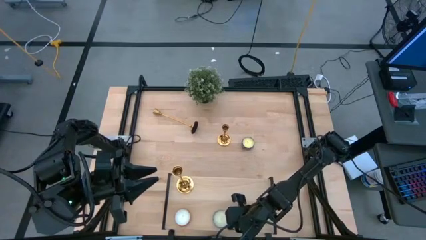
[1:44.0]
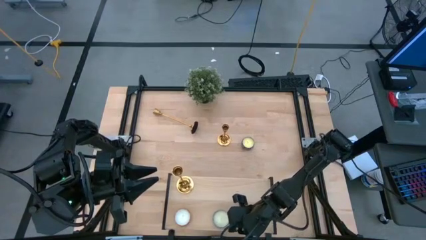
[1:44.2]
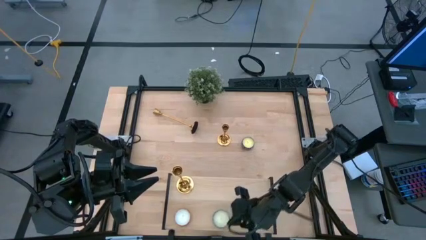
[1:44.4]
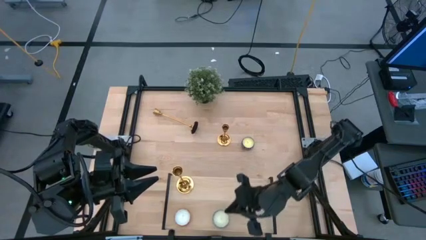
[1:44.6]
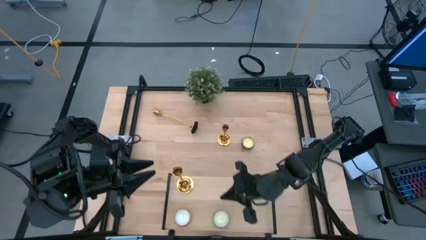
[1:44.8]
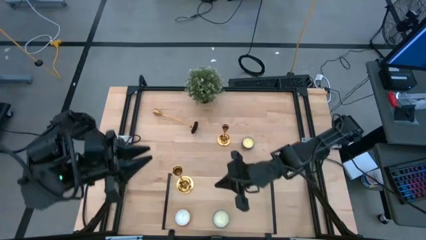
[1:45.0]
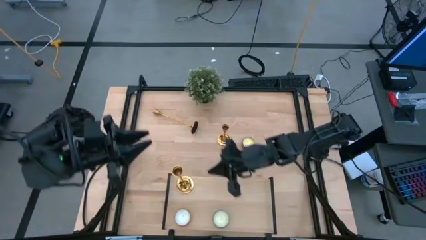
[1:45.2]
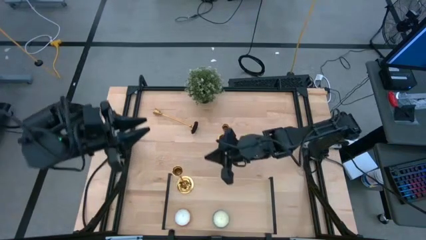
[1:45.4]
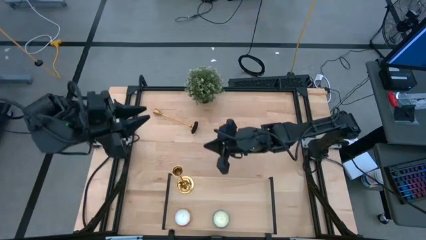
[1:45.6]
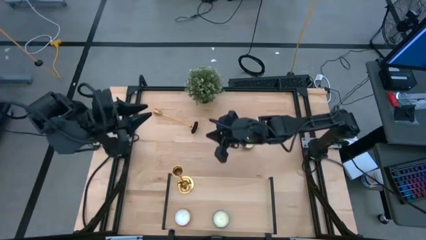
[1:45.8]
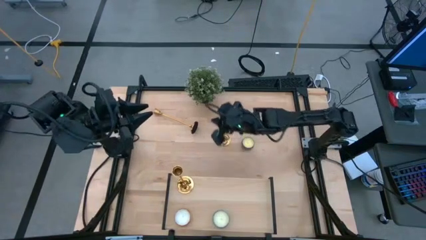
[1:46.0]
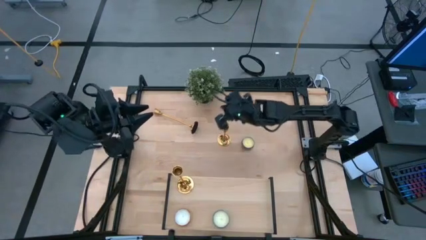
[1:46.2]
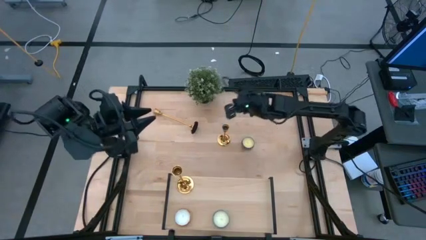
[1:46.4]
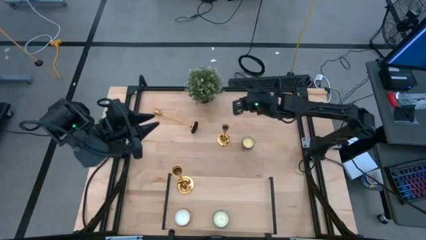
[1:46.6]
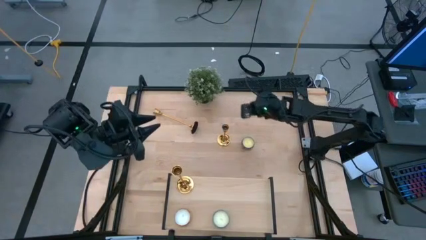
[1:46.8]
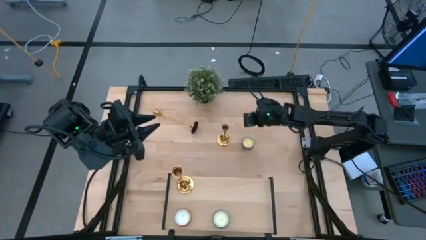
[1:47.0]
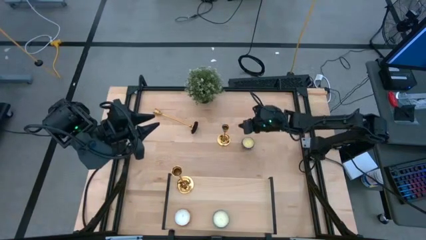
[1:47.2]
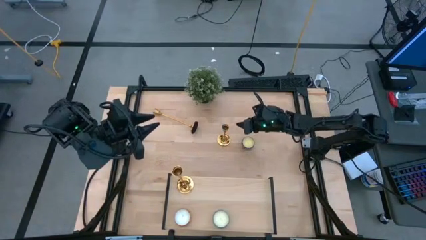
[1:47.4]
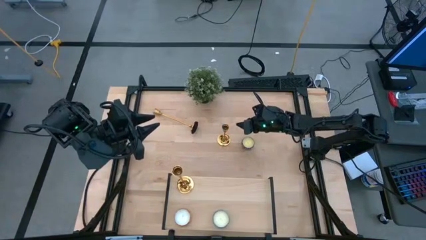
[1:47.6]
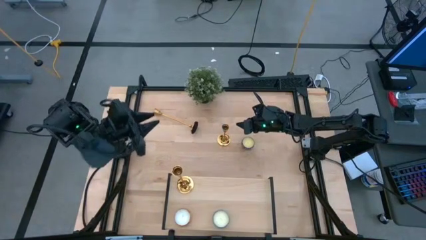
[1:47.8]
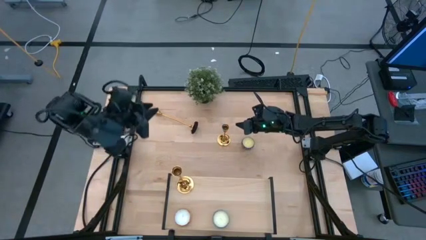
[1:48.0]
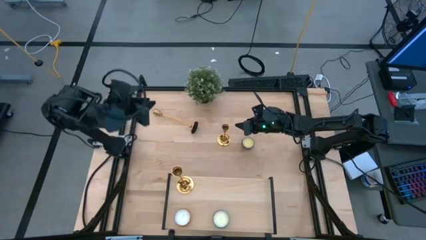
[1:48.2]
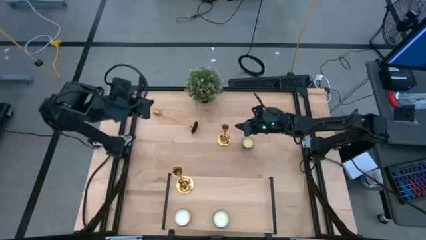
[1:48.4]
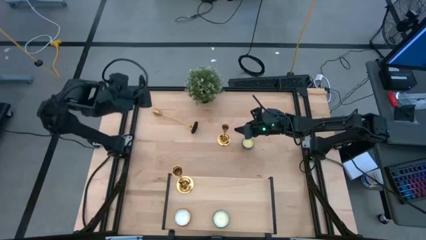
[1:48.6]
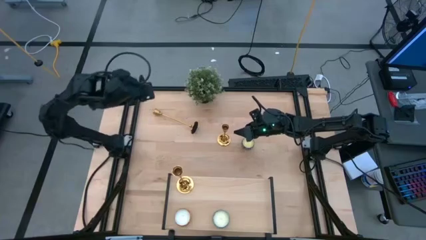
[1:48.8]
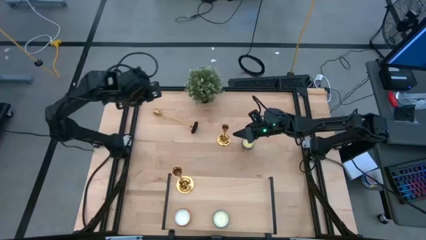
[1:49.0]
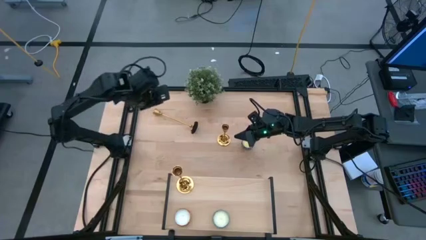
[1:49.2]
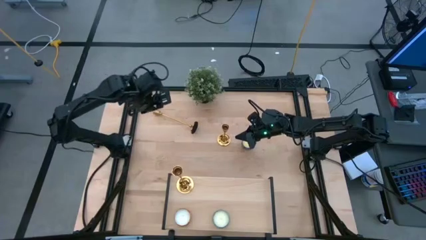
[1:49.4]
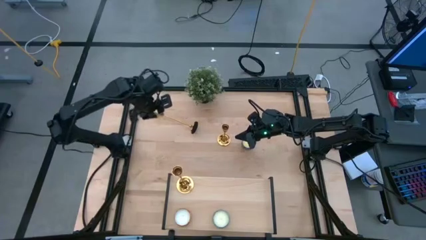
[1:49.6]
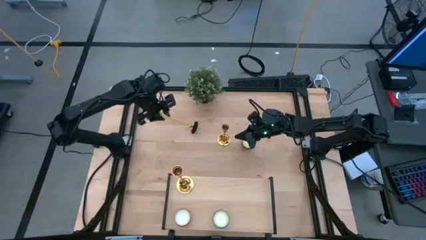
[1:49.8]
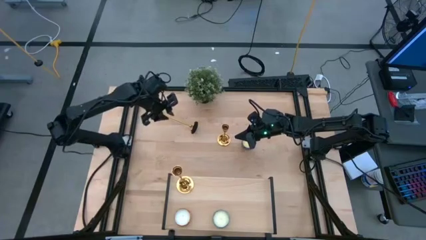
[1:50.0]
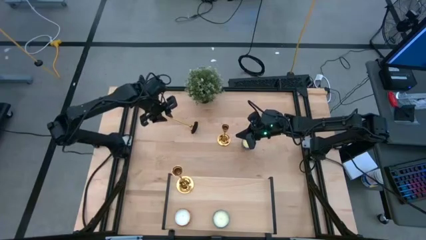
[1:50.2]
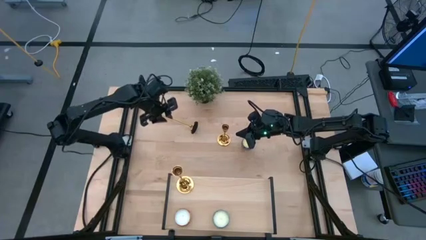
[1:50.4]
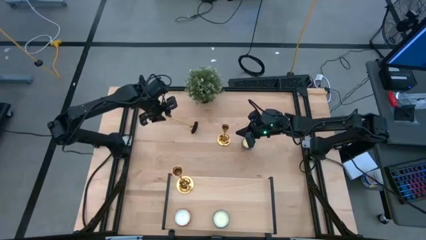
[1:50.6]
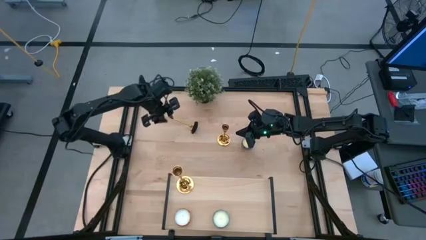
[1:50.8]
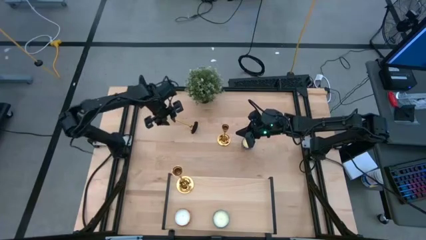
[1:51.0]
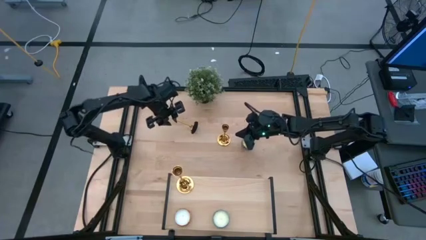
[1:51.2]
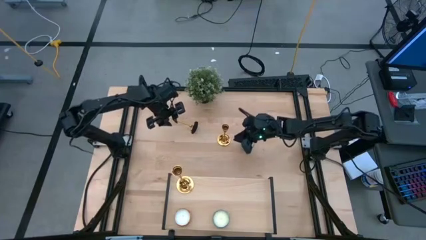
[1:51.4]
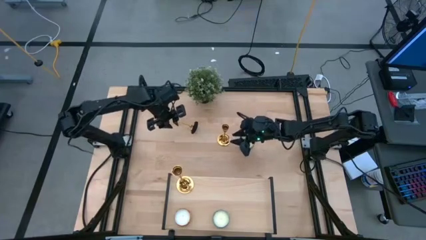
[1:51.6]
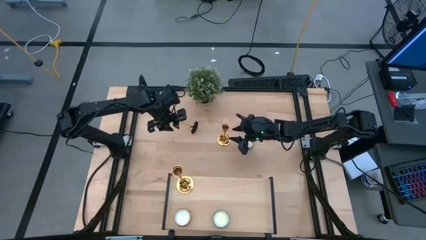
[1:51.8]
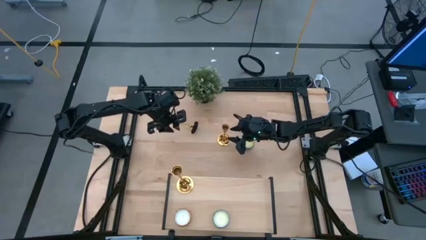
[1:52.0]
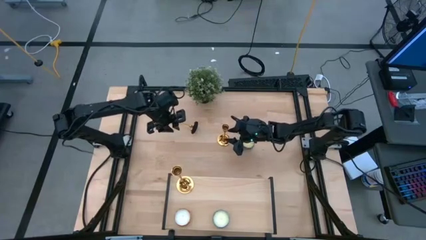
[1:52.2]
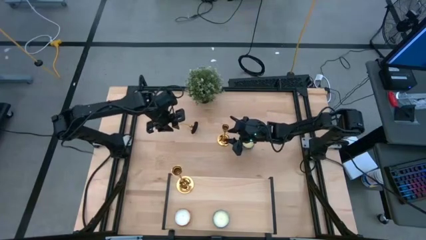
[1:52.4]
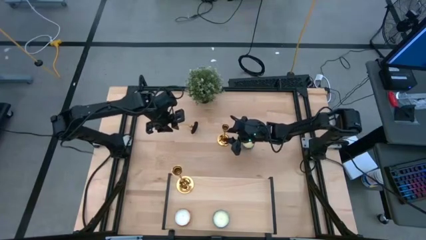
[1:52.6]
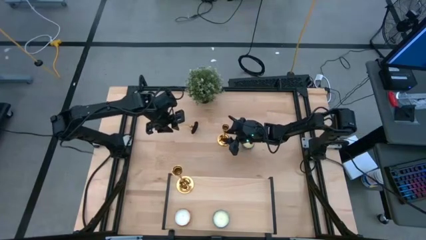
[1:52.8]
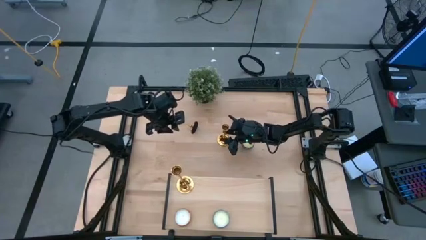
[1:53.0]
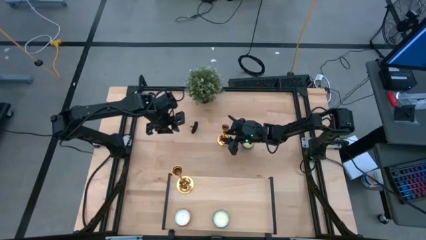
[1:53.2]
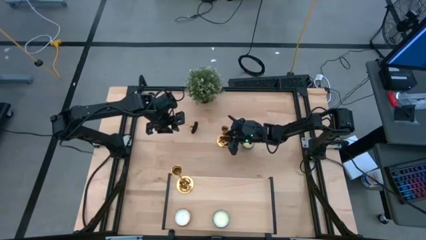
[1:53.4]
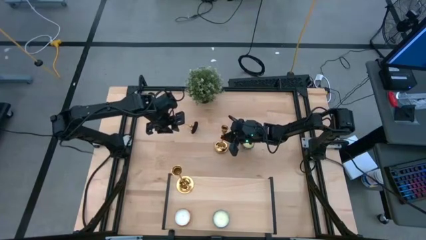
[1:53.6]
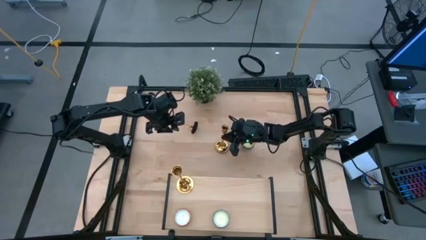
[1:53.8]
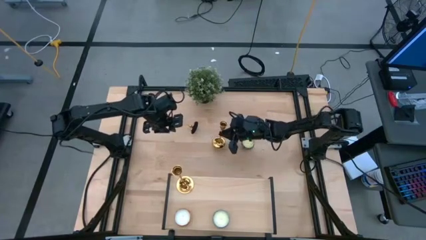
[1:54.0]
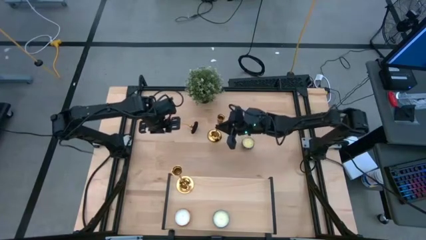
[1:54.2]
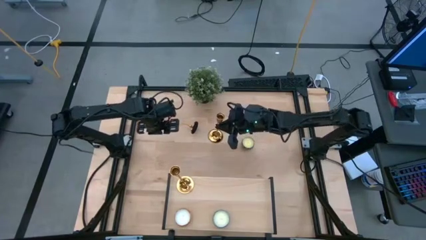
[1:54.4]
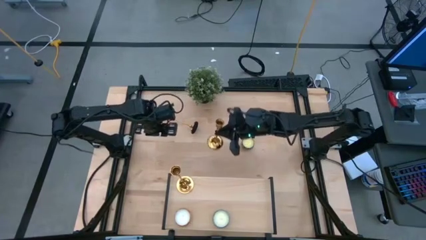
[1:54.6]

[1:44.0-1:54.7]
Task: Pick & Place candle stick holders
Put the right gold candle stand on the shelf

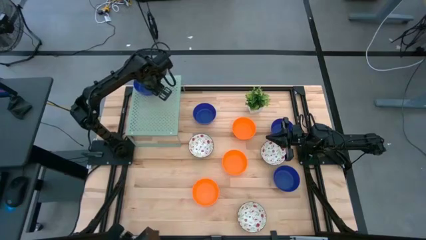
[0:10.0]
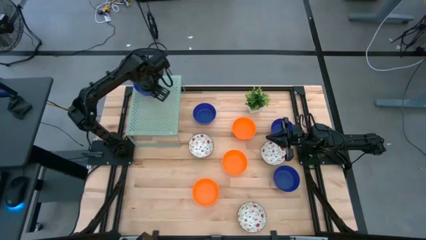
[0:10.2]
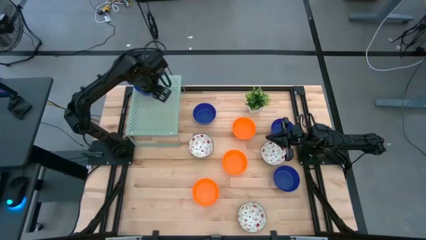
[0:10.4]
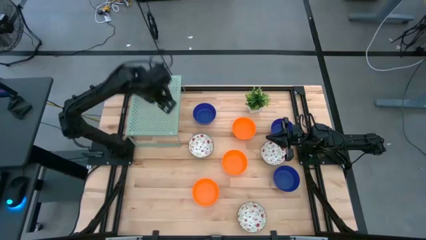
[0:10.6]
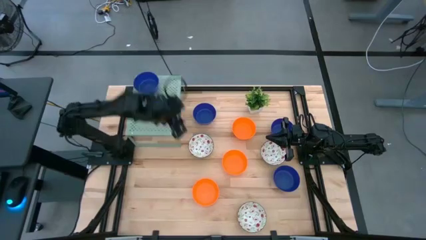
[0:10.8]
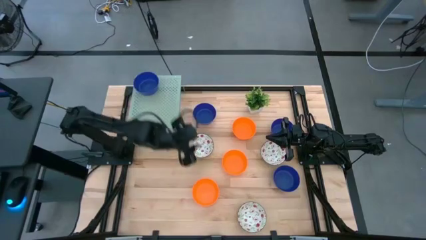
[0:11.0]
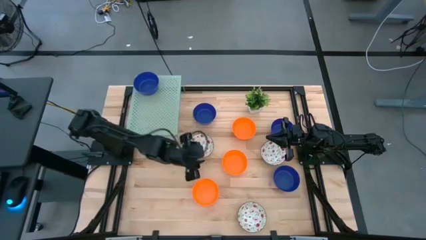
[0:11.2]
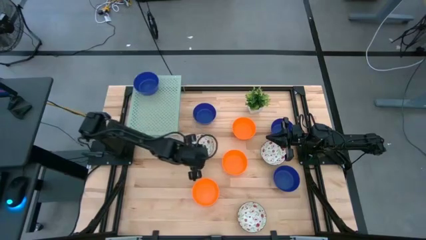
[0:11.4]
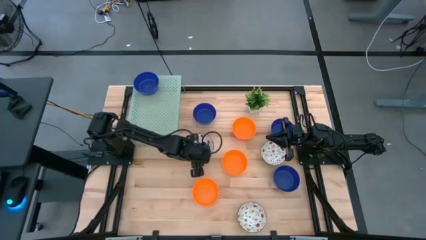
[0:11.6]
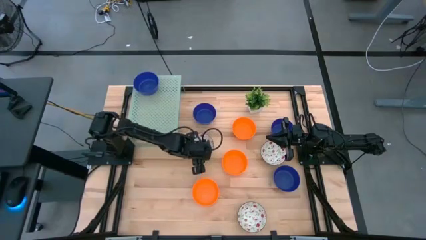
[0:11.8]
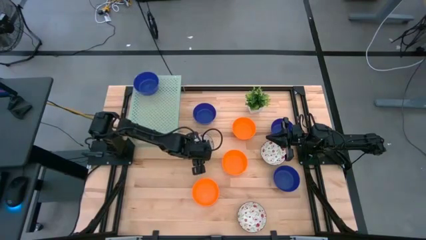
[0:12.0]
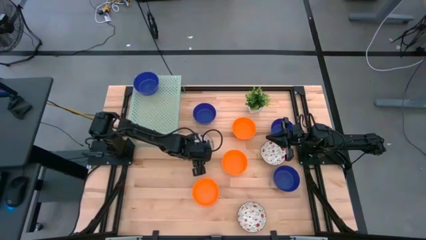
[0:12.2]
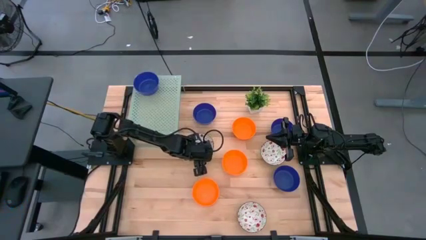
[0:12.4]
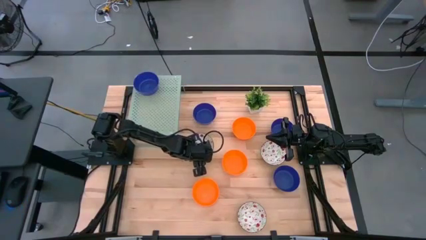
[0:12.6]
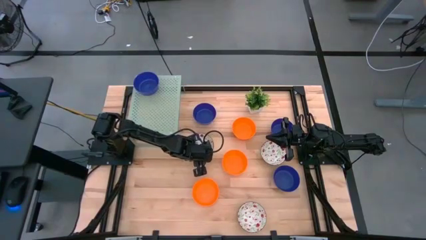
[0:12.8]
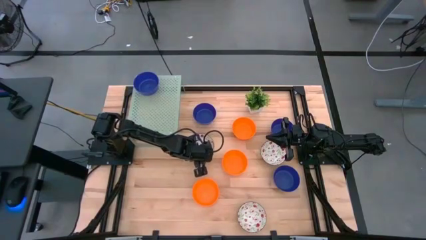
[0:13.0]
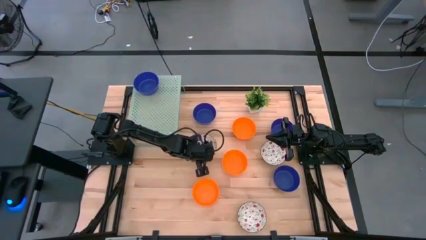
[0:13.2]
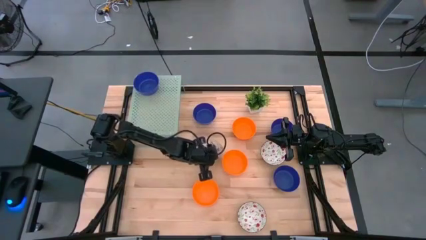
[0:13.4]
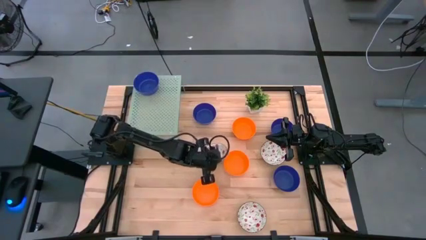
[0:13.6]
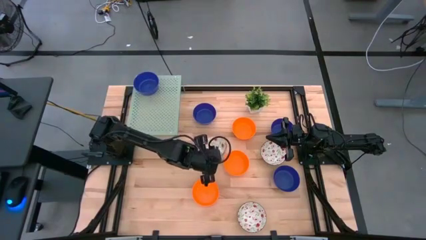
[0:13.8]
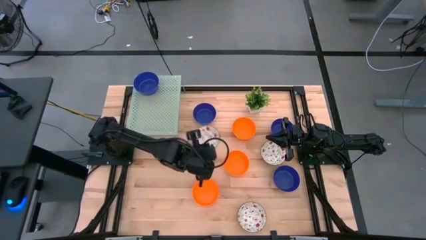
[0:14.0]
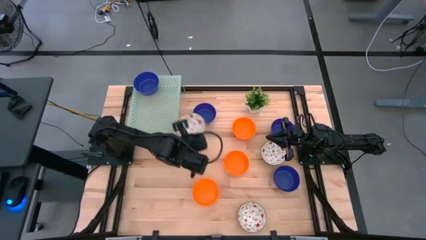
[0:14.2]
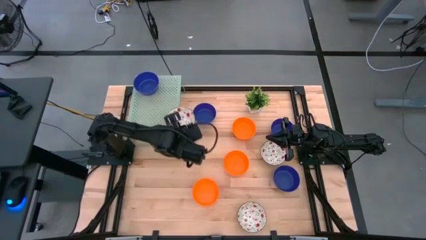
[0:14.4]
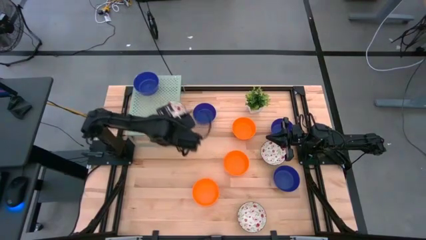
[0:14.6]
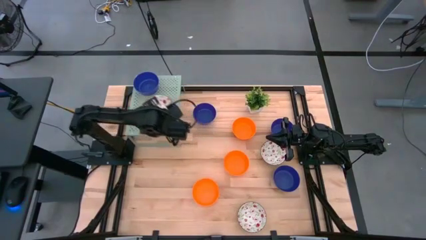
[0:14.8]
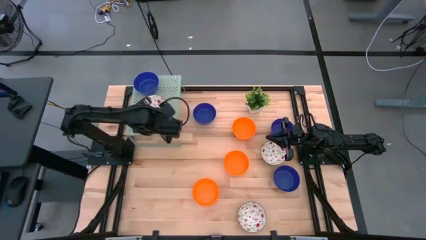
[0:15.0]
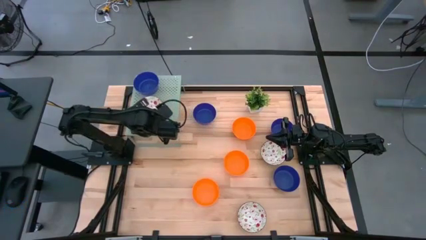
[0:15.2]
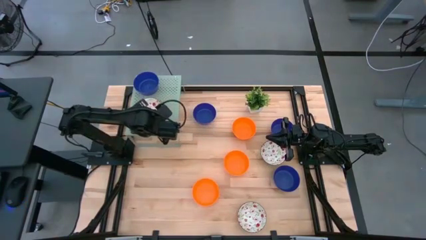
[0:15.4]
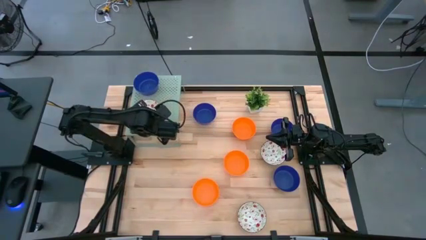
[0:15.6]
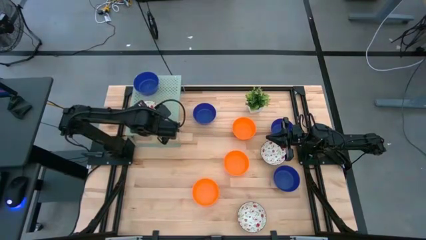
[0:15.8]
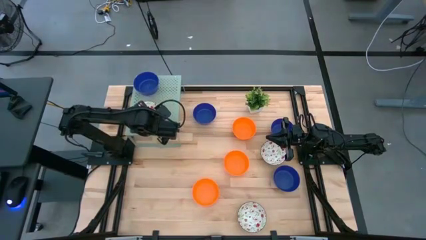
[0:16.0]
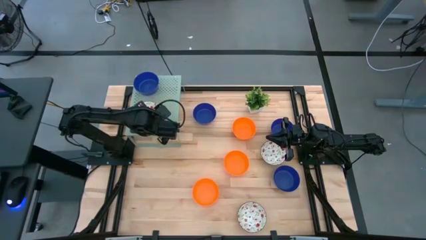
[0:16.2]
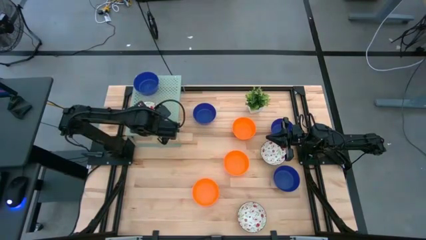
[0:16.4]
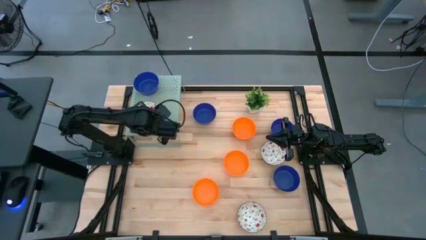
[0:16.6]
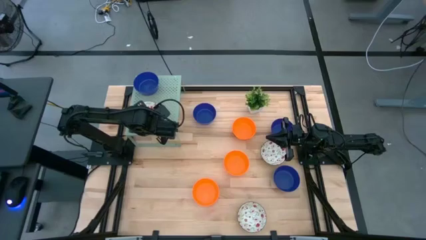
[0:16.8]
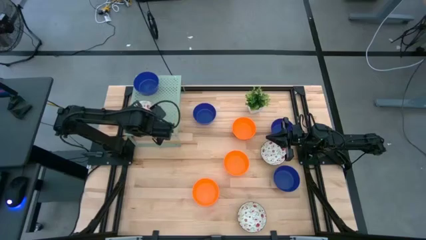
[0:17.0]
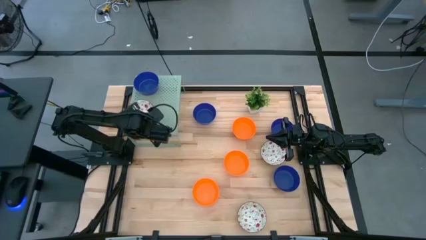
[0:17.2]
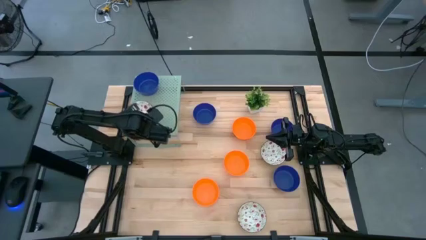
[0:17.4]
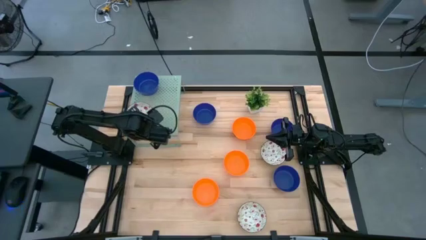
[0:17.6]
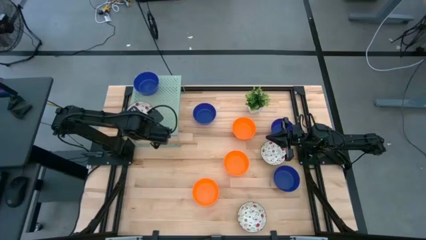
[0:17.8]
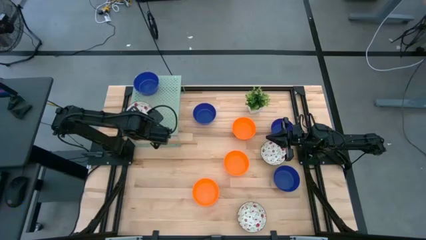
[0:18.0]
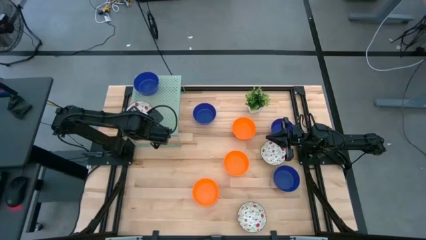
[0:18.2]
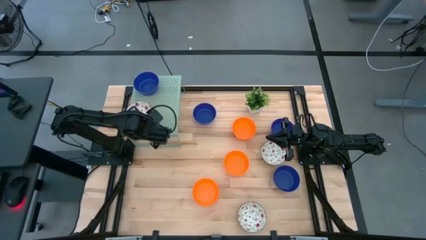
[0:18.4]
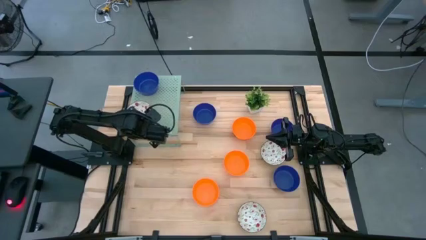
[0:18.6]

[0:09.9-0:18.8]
Task: Pick & Place Mini bowls
Put the white bowl on the shelf
